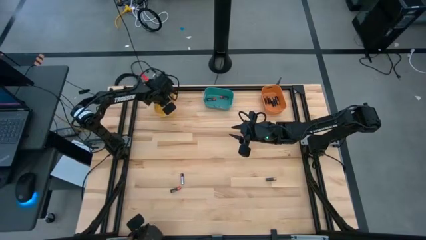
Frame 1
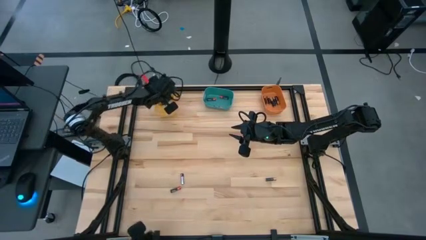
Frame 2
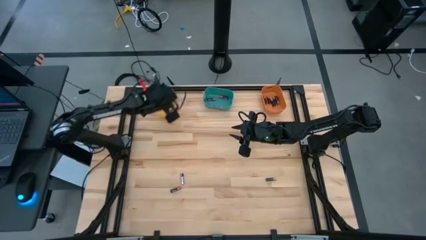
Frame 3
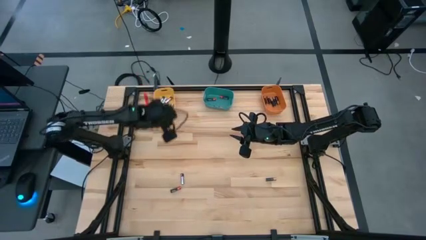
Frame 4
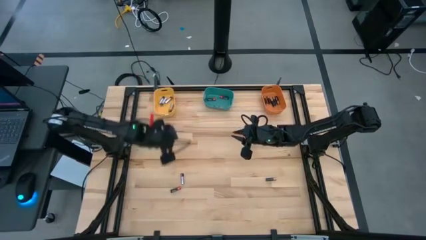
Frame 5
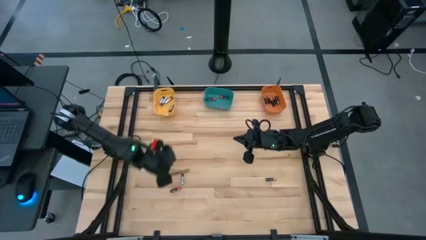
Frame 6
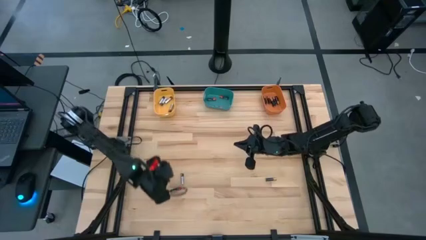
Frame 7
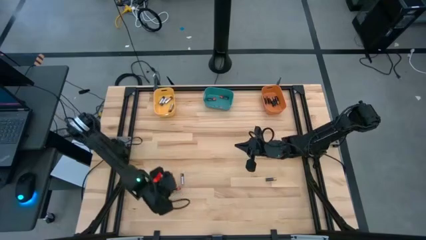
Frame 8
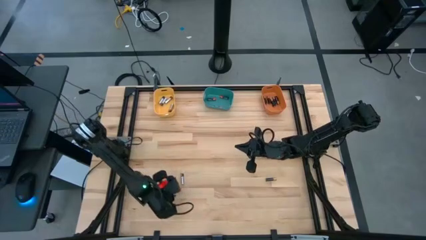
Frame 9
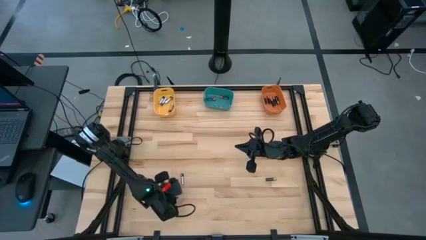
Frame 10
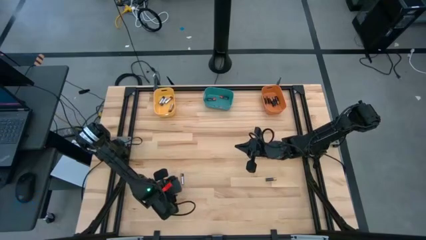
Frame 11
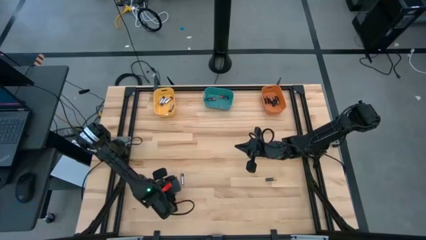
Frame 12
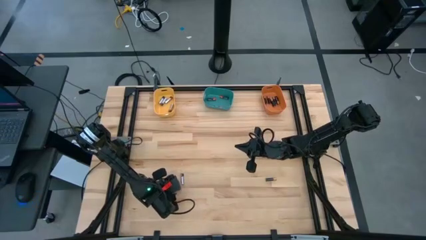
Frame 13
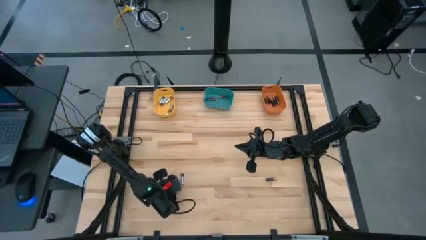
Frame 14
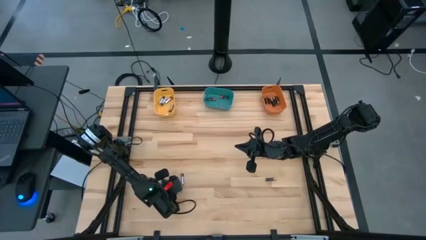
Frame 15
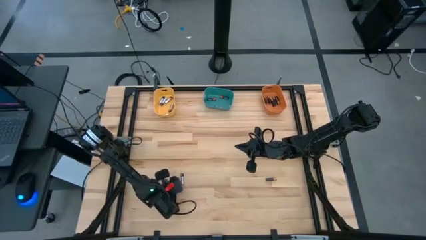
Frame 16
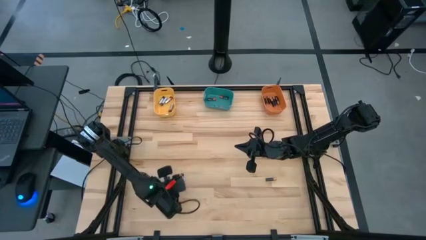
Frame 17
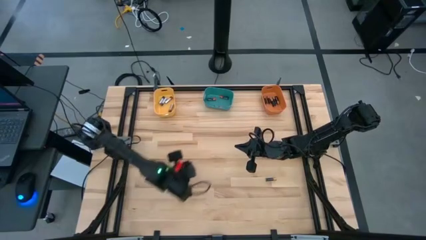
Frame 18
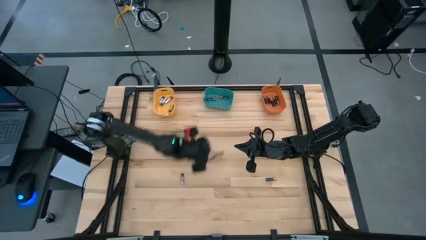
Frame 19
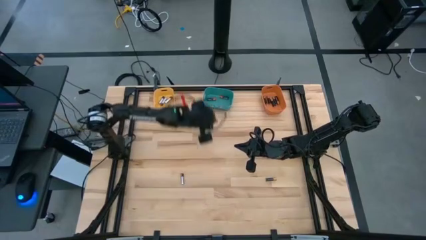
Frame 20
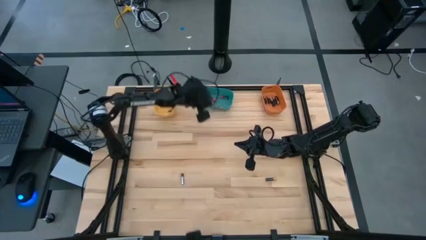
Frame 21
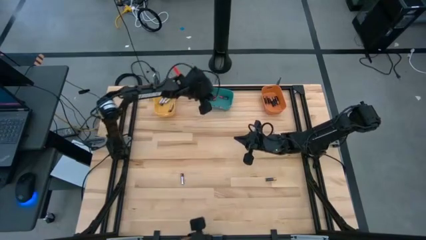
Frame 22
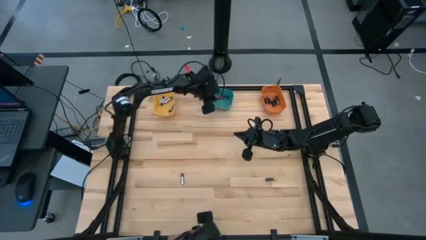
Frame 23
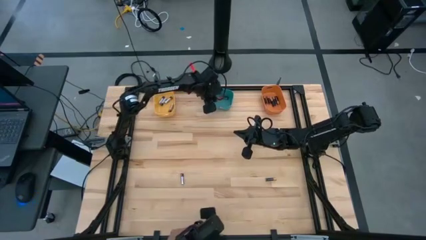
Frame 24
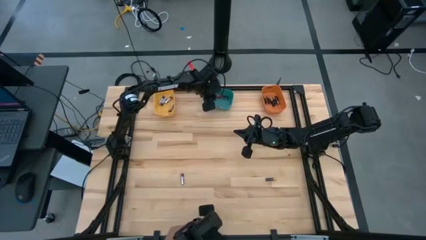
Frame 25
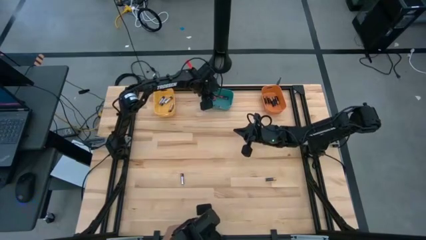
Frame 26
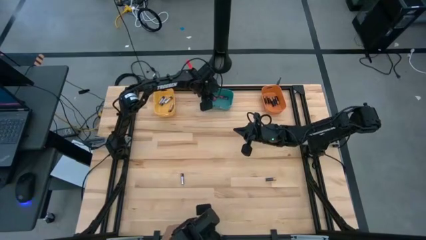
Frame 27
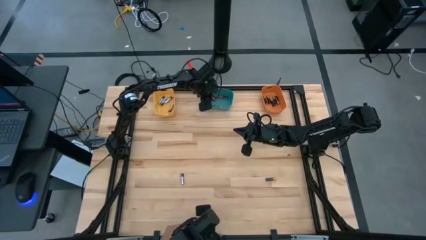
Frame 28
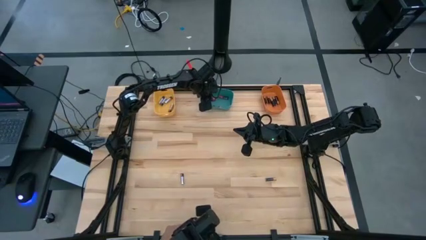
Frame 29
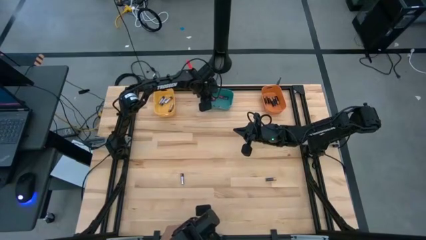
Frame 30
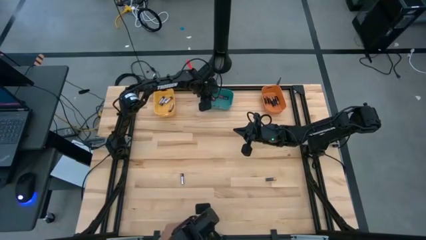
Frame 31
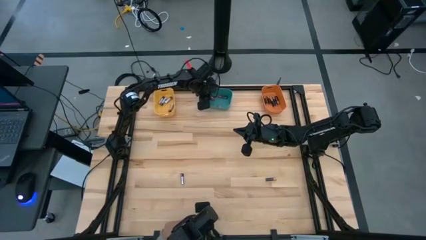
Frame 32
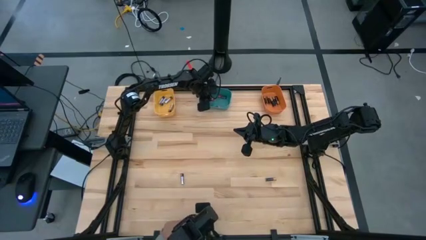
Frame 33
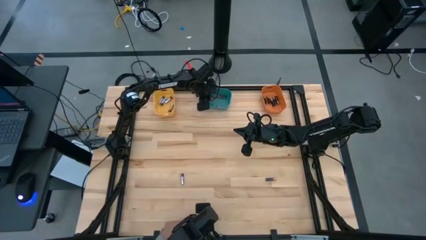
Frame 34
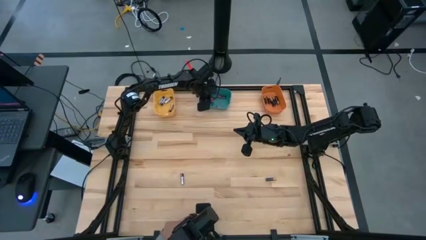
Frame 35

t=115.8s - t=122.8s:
Task: Sort batteries
Put the red battery into the green bin

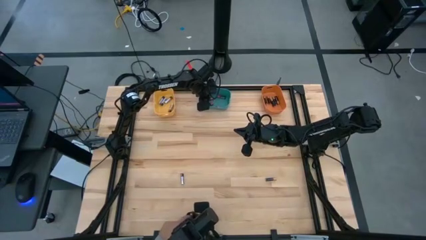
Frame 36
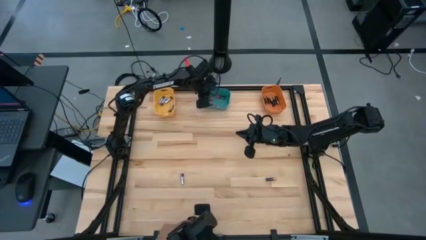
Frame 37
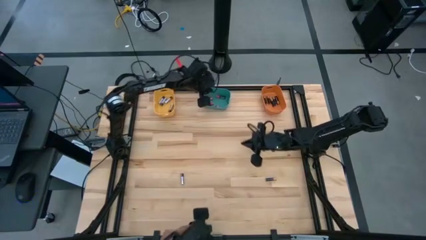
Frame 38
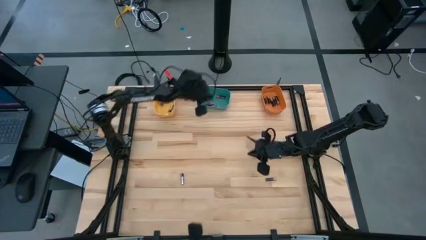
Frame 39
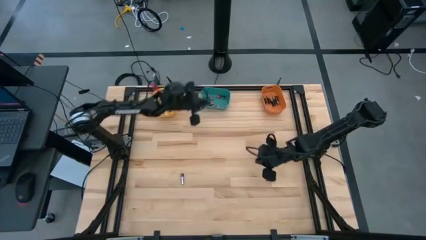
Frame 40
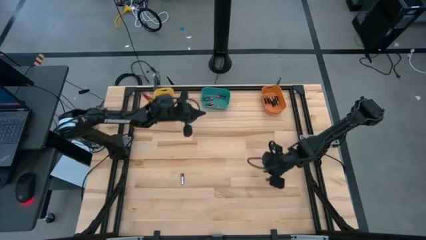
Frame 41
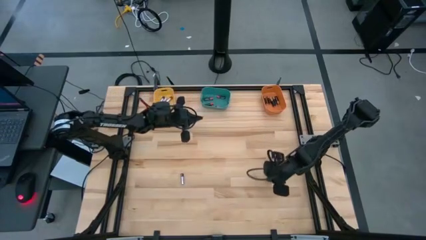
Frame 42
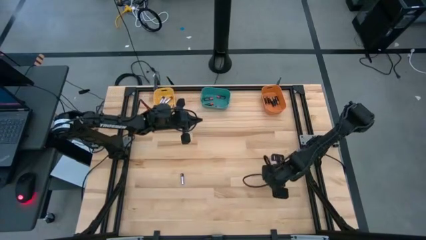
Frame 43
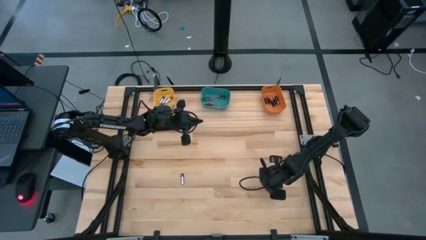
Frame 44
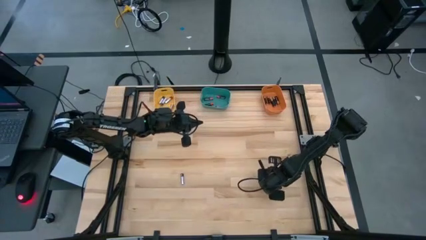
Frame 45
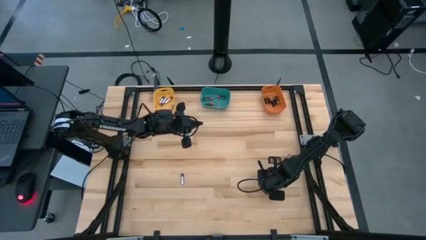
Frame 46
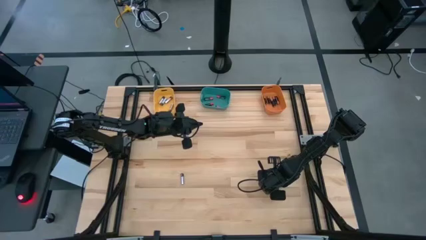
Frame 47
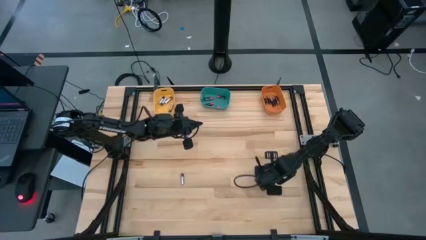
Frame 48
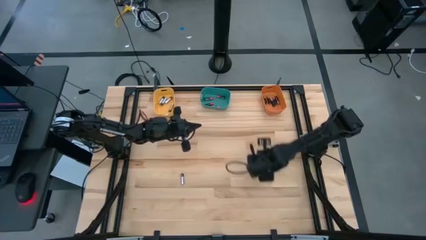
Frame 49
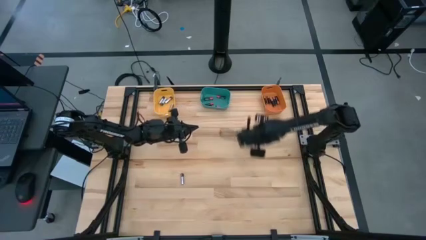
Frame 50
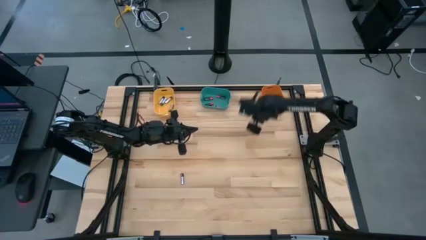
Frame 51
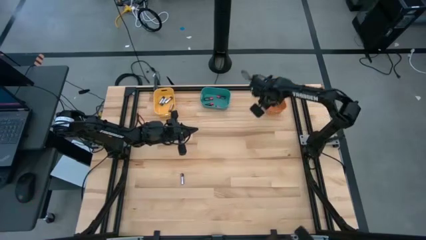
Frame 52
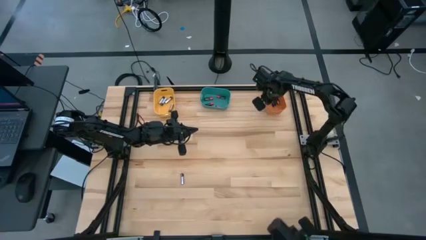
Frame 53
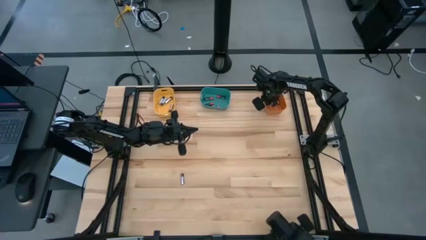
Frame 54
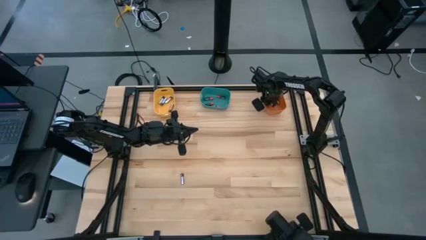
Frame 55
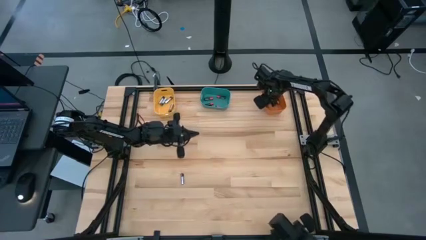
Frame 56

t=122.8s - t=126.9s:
Put the brown battery into the orange bin

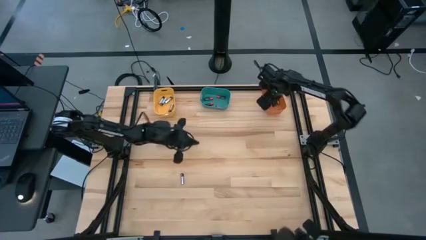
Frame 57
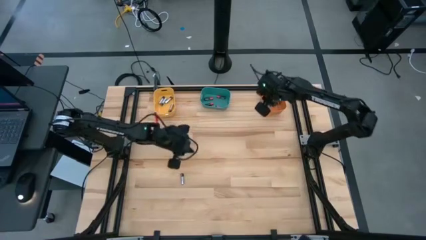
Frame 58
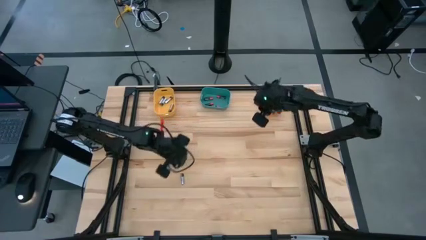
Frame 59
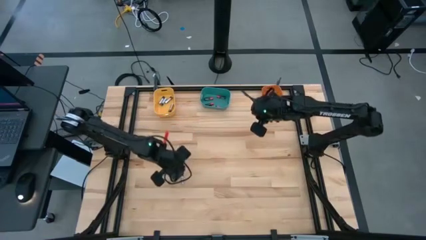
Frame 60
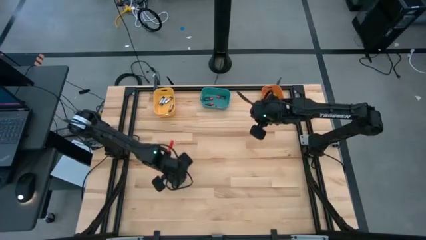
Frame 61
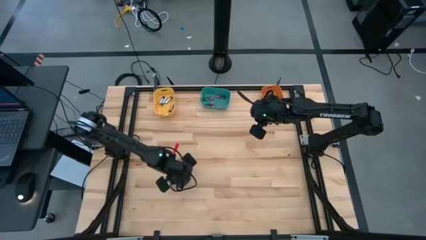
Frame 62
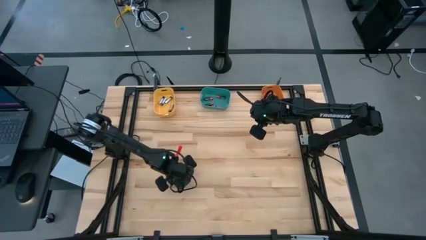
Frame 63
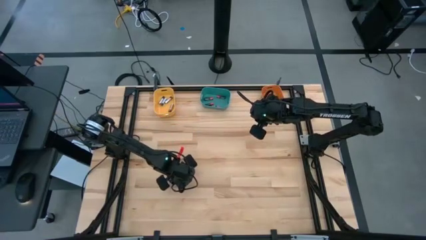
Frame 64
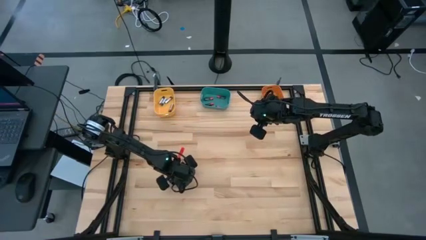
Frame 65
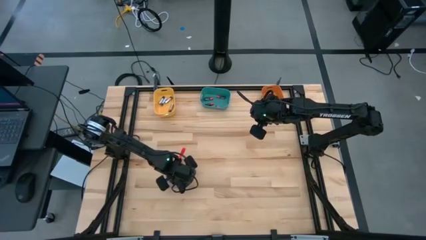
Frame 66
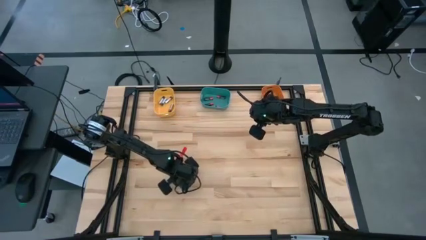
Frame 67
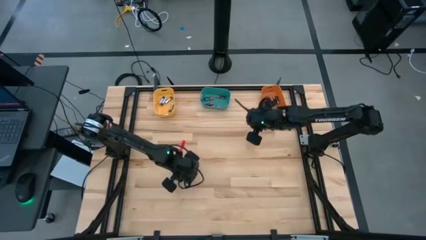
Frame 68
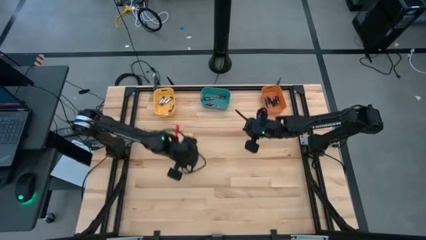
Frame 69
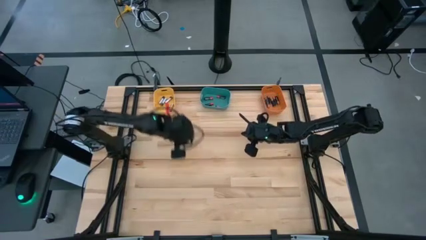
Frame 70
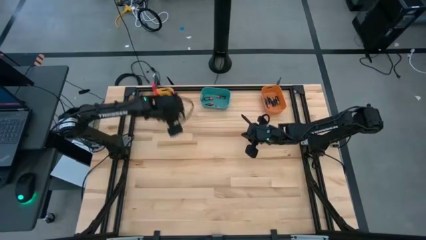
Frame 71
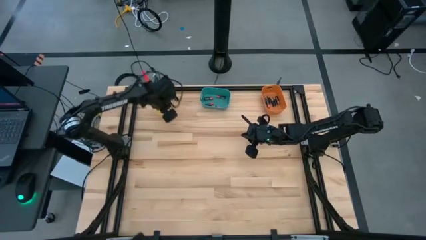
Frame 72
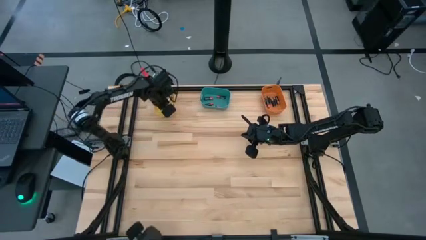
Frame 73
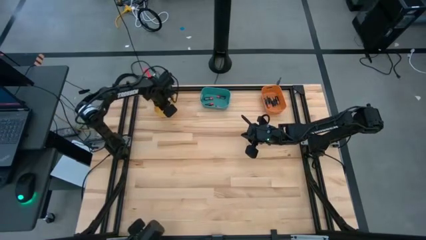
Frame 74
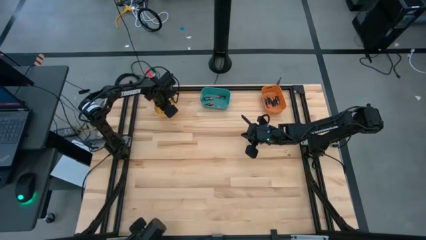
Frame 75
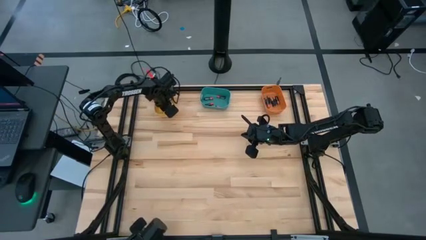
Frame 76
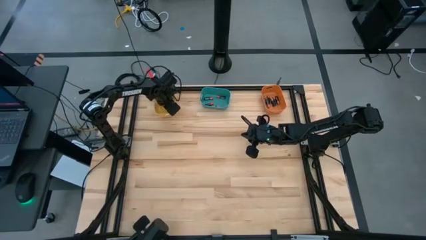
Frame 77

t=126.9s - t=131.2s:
Put the silver battery into the yellow bin
